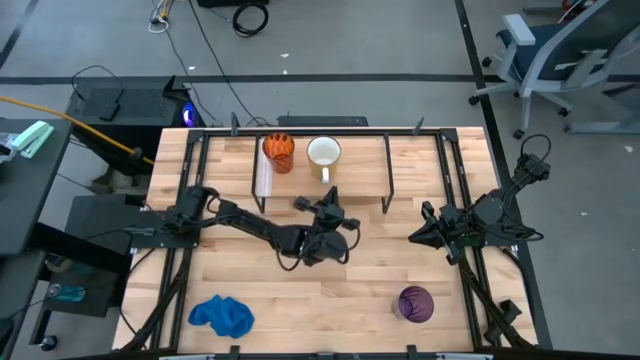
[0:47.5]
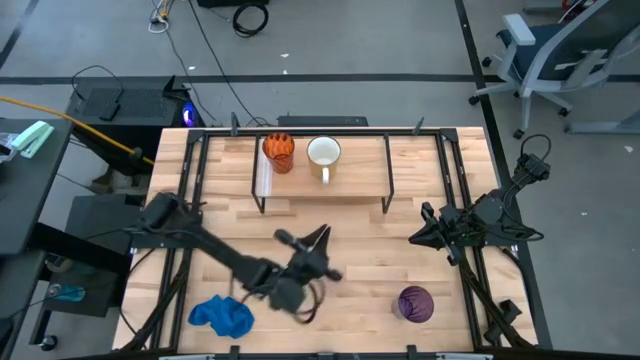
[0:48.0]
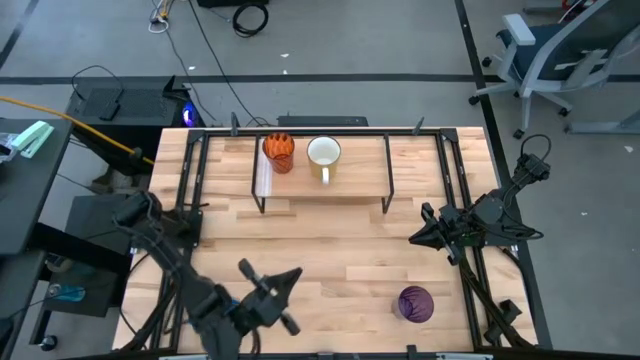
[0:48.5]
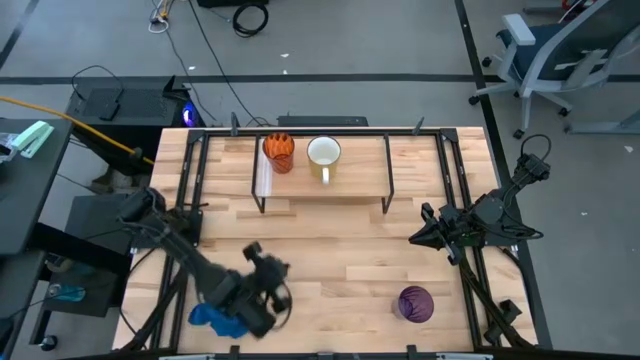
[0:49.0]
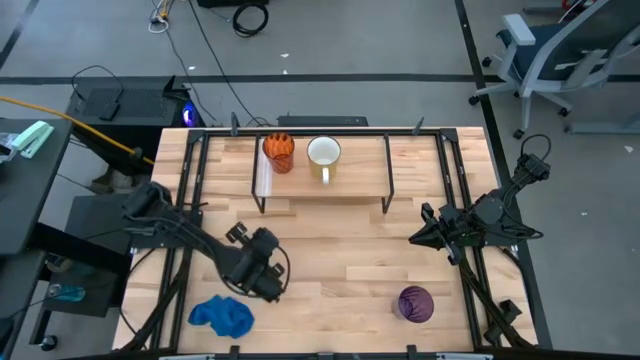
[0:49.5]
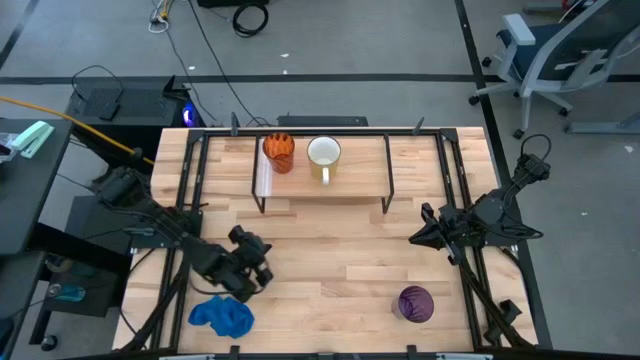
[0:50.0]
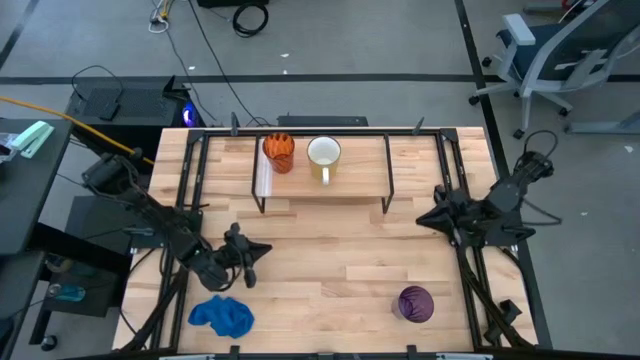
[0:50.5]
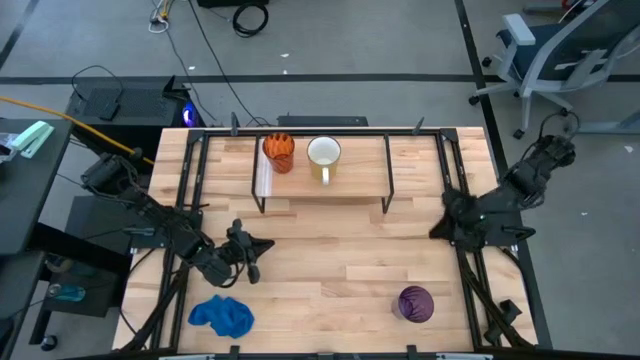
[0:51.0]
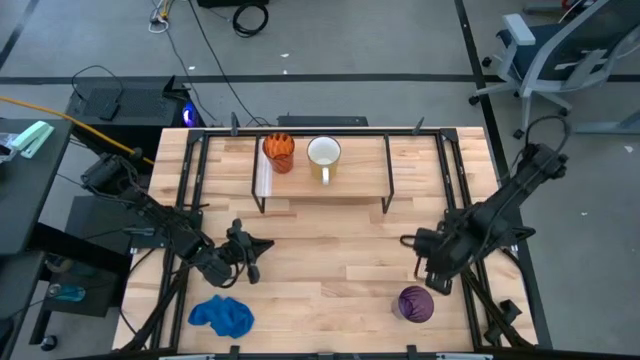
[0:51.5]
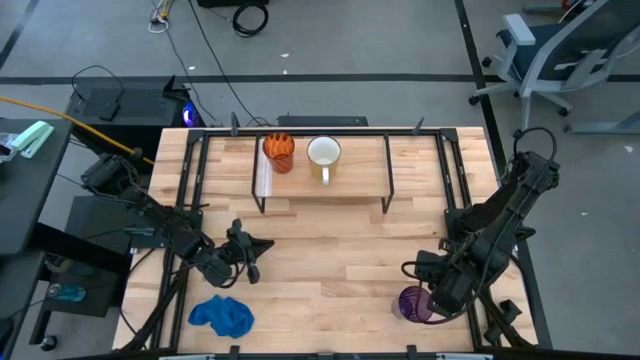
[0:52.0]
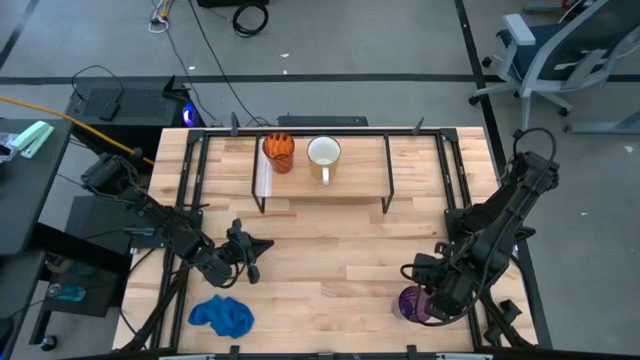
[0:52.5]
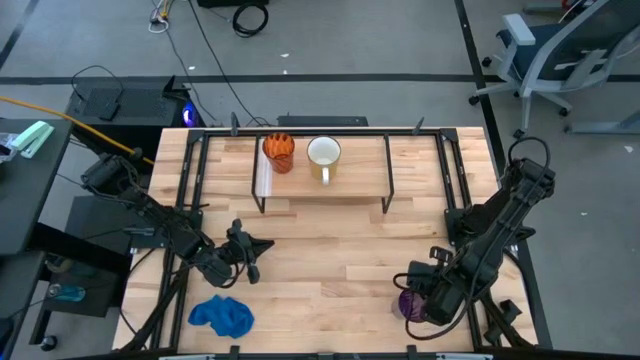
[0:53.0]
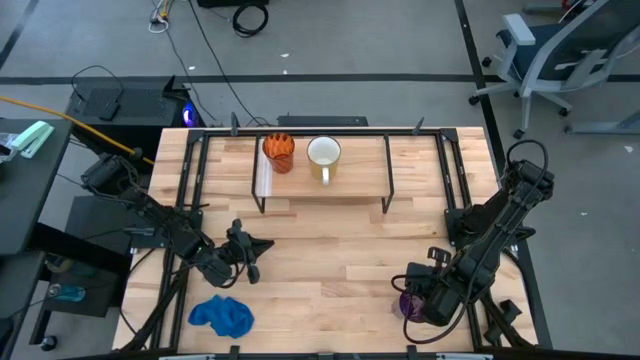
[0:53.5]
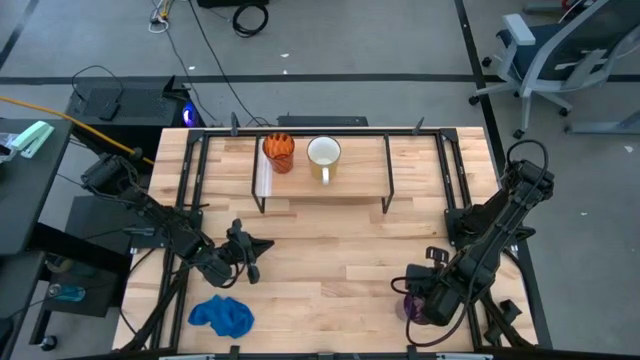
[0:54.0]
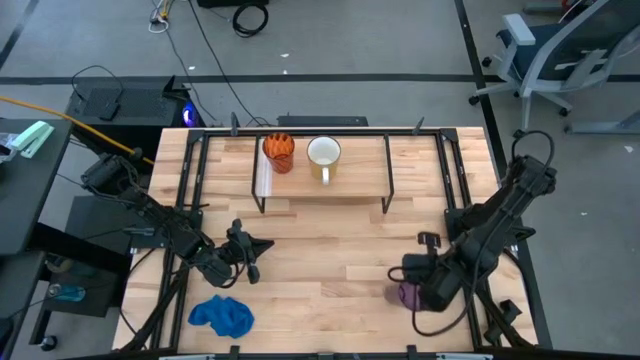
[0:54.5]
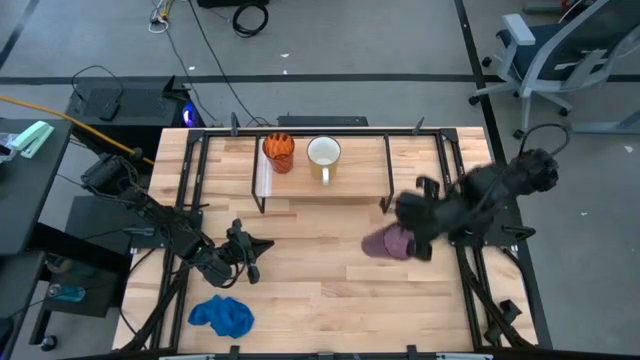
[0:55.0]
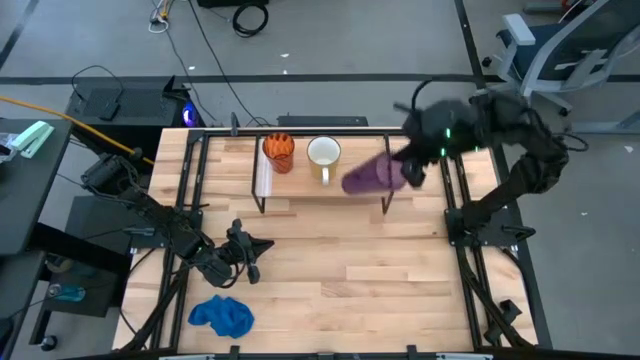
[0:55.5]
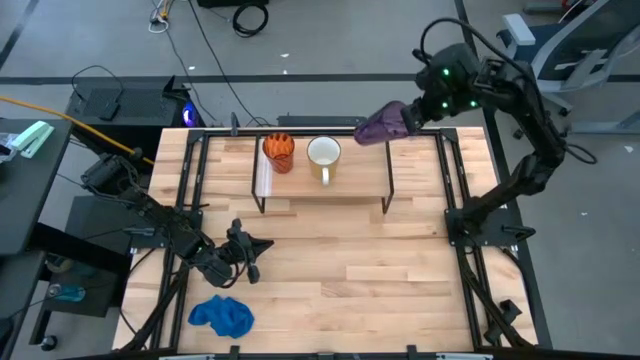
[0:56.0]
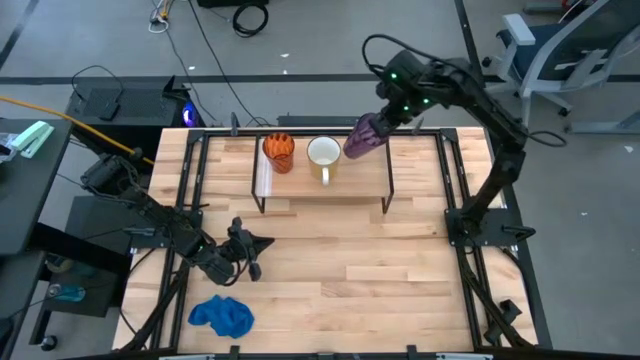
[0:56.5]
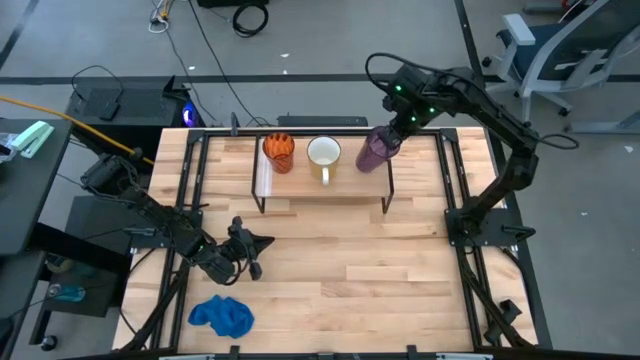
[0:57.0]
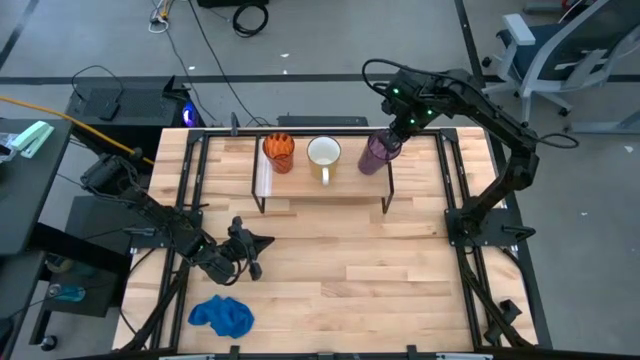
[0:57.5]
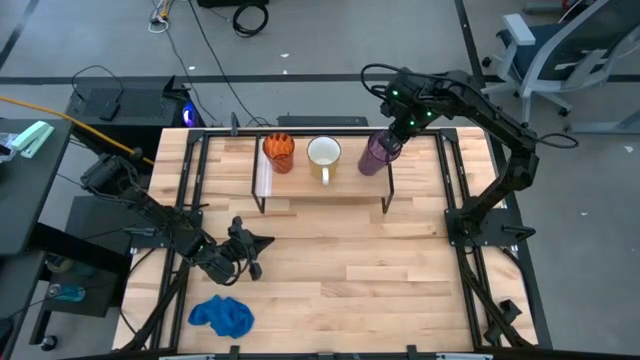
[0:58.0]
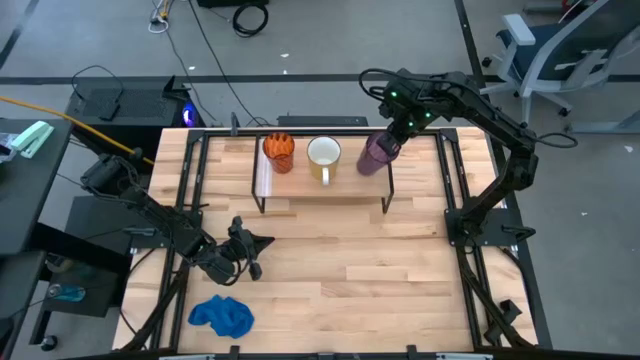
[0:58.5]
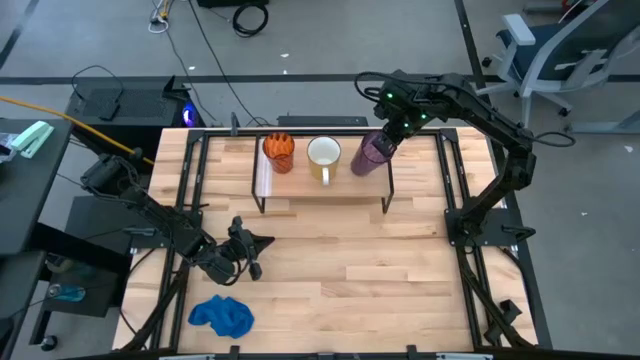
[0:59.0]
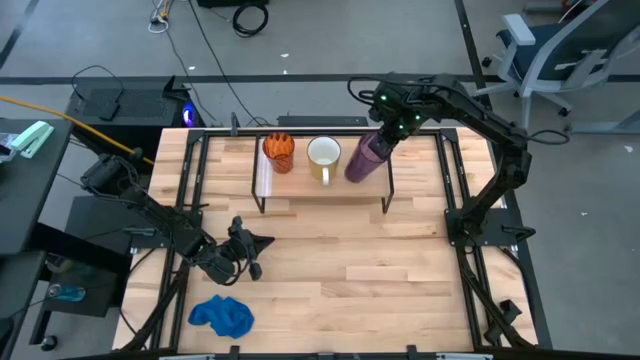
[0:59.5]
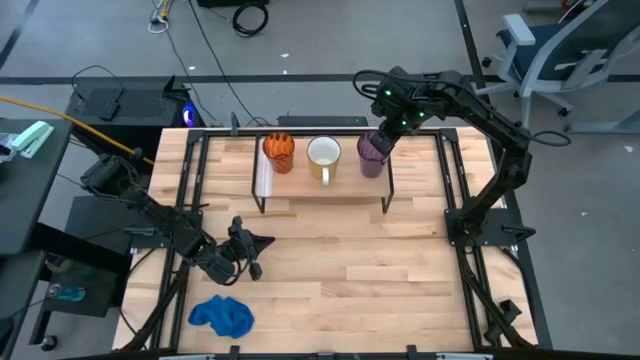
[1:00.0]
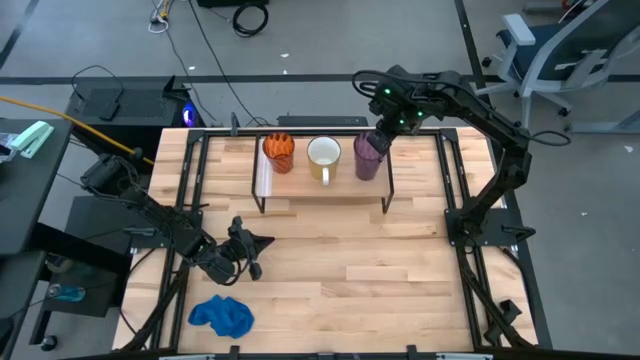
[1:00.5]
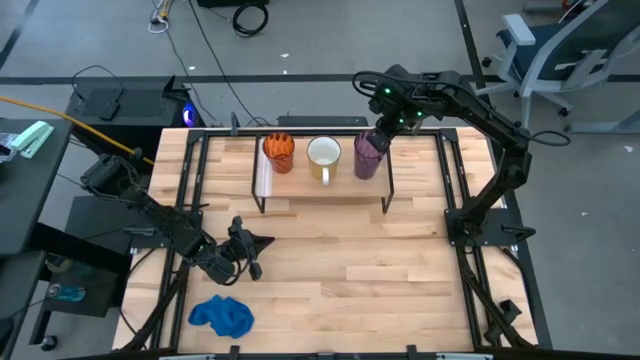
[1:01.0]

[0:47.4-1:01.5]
Task: Stack small to large cups/mugs on shelf
Put the purple cup on the shelf

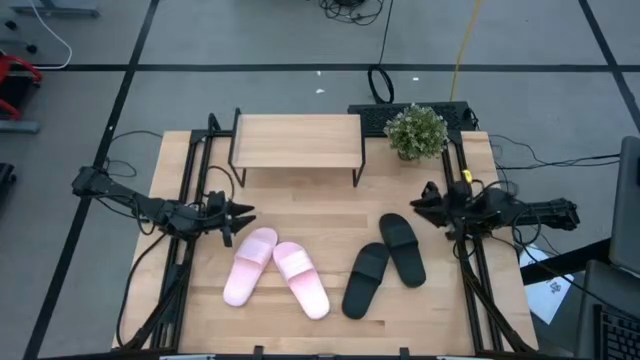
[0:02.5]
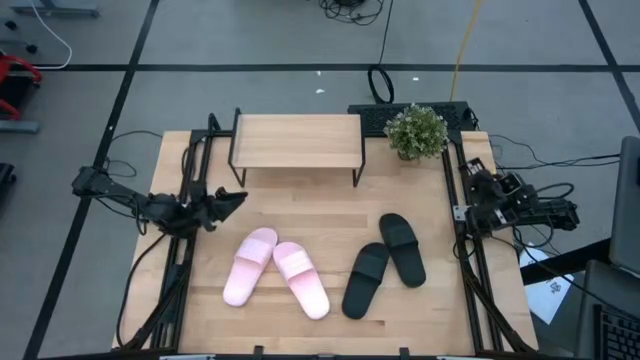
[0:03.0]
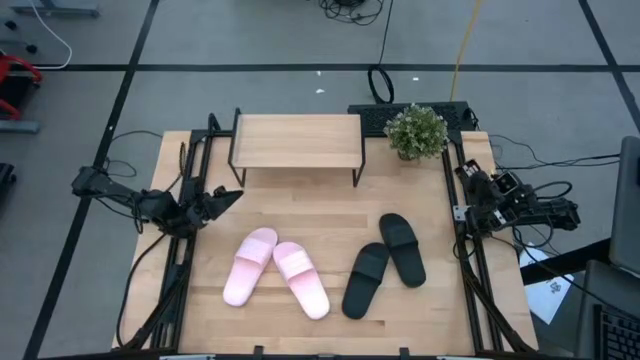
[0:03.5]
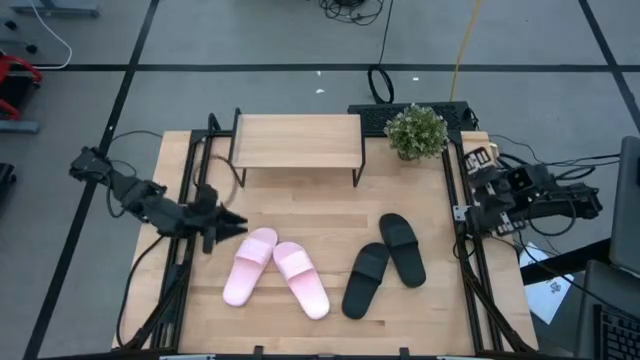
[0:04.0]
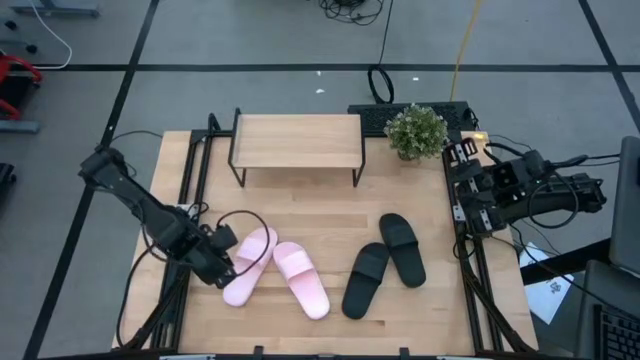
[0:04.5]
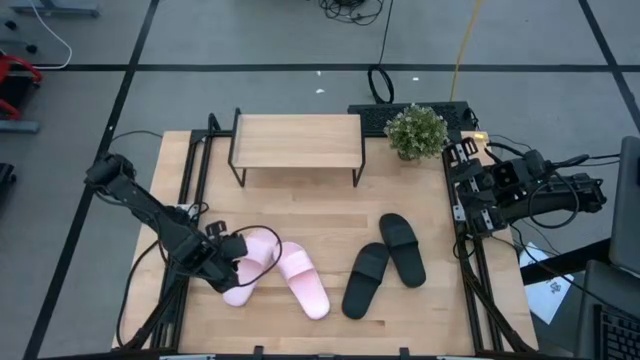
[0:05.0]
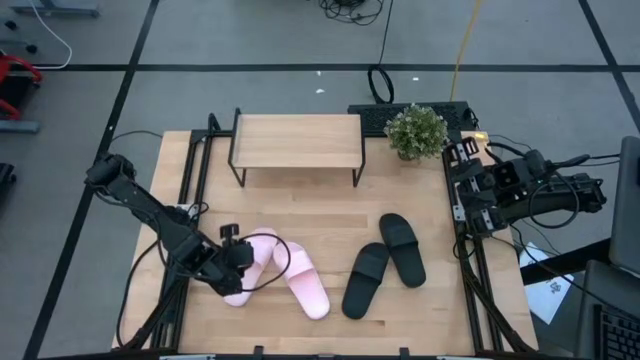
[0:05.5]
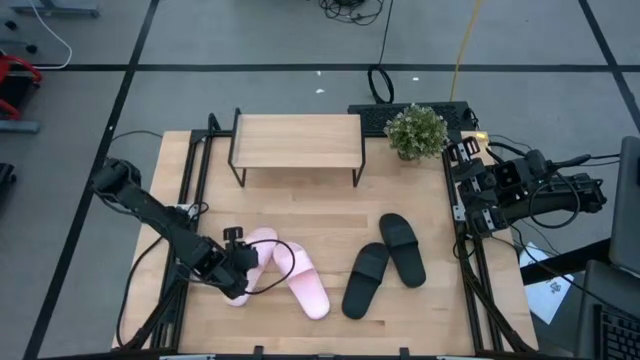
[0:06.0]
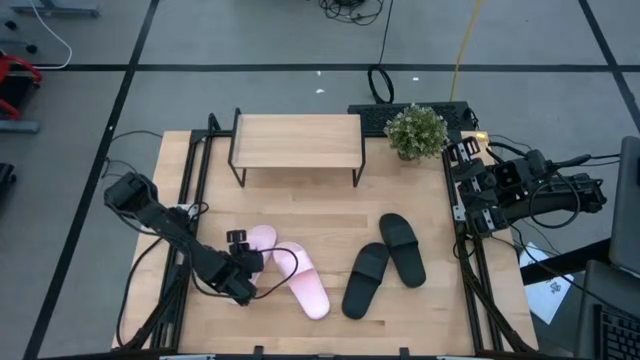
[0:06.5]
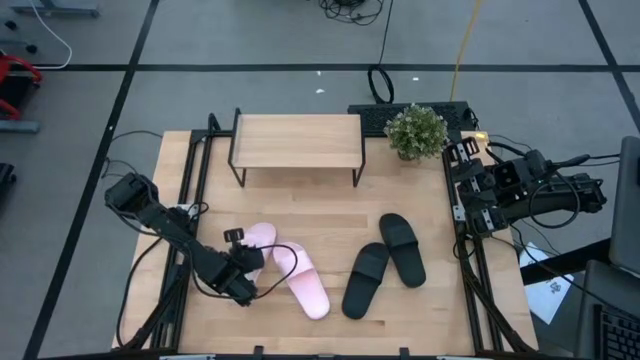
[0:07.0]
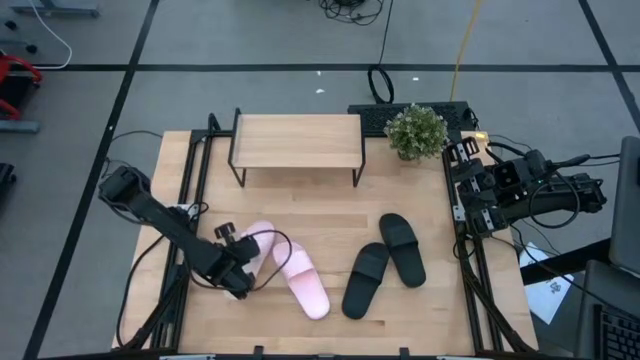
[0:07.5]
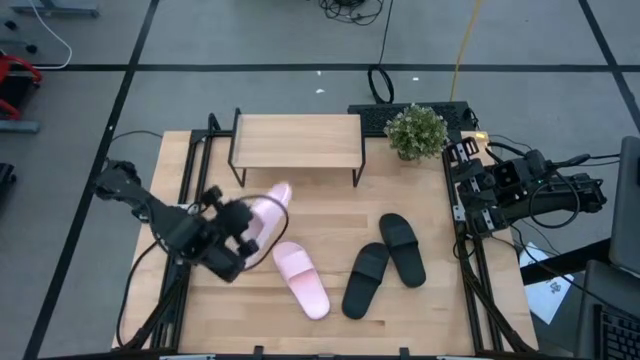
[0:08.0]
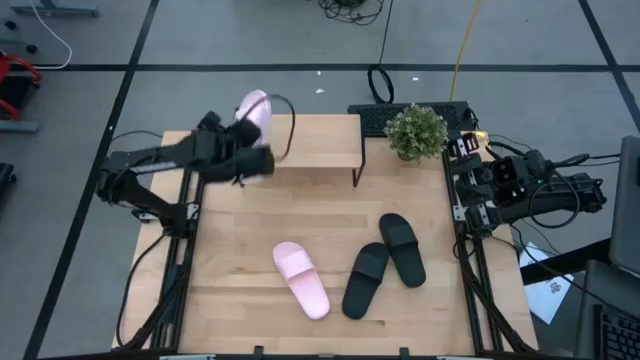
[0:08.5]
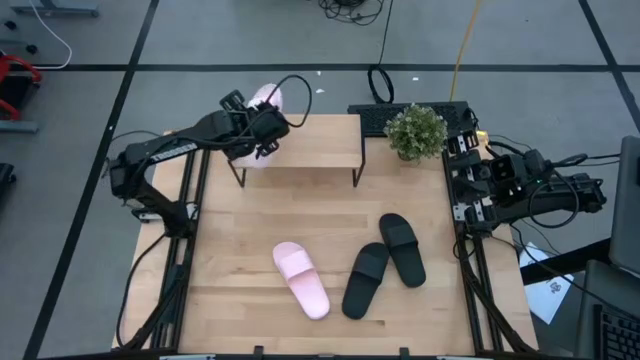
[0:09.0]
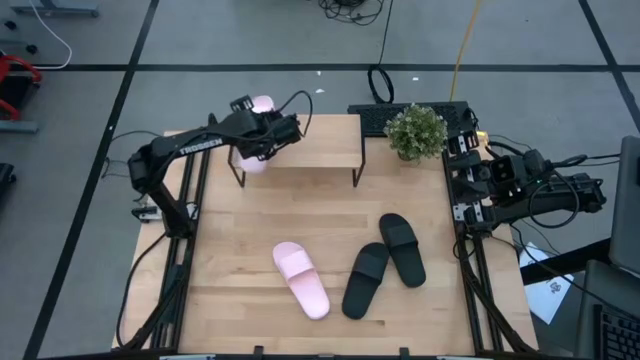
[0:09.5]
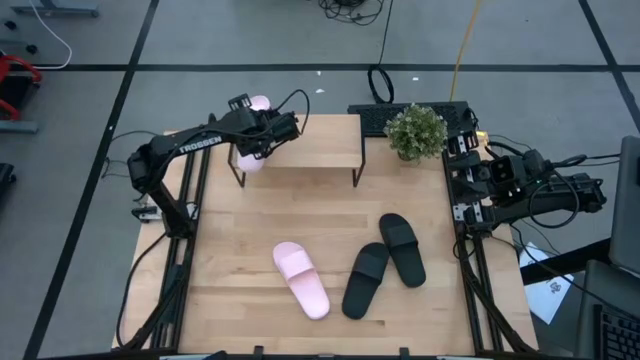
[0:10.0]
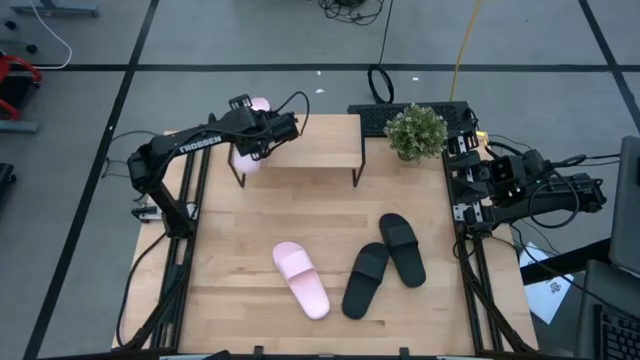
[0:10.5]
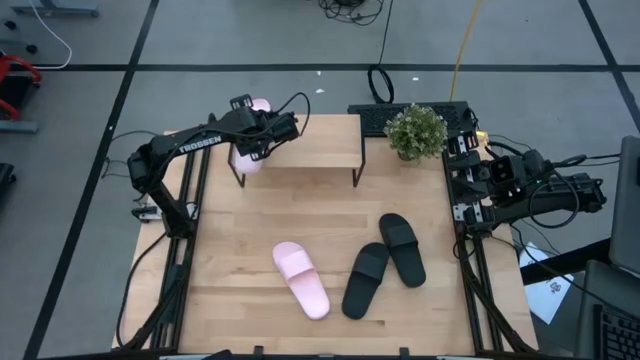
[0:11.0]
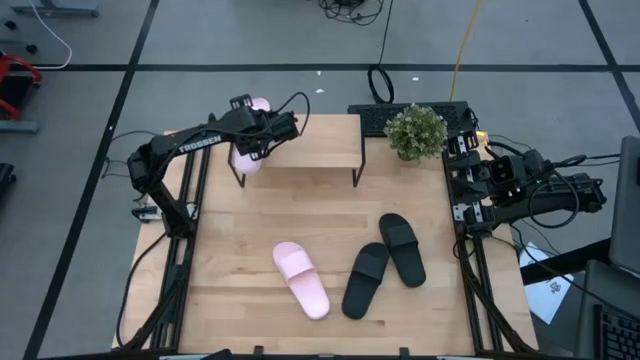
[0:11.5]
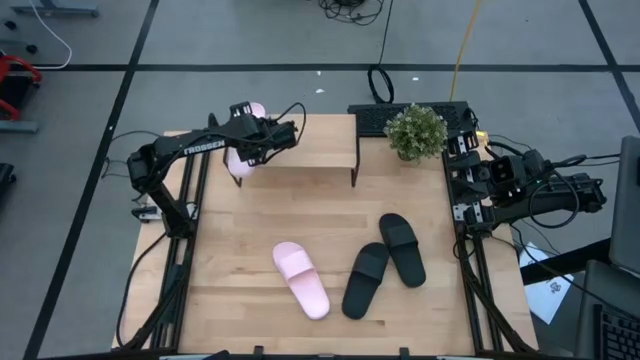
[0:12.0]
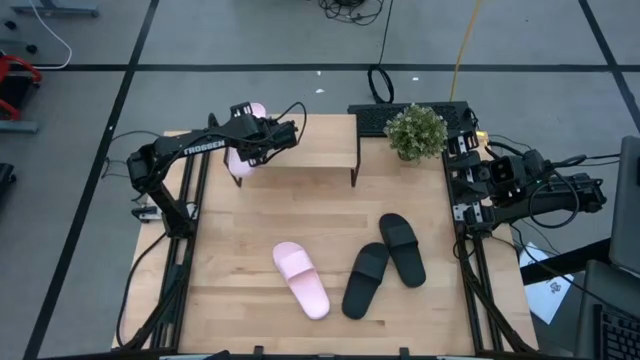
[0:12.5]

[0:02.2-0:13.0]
Task: Pick and place slides into the shelf
Put the left pink slipper on the shelf
